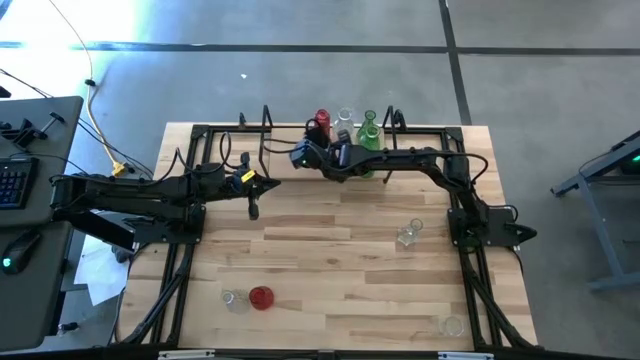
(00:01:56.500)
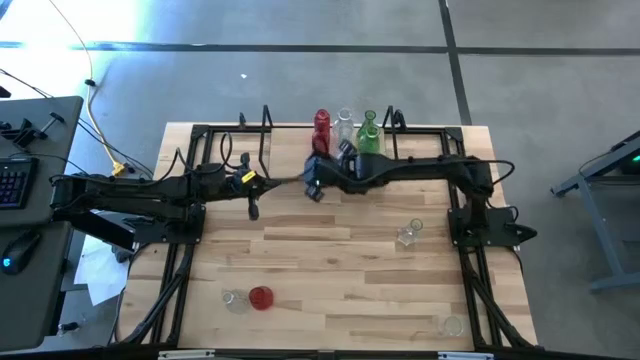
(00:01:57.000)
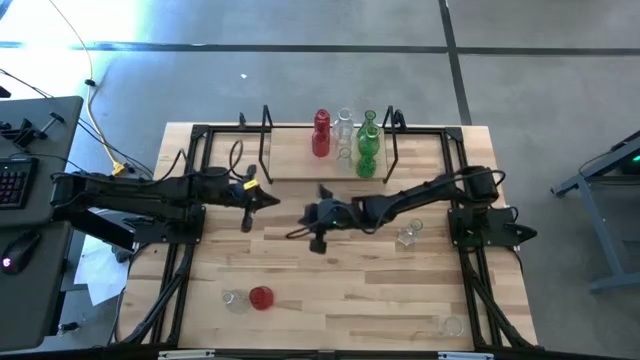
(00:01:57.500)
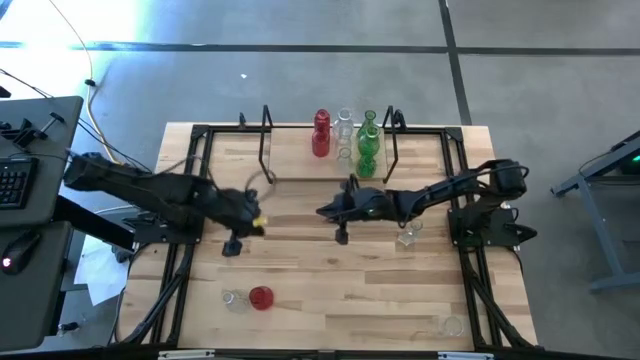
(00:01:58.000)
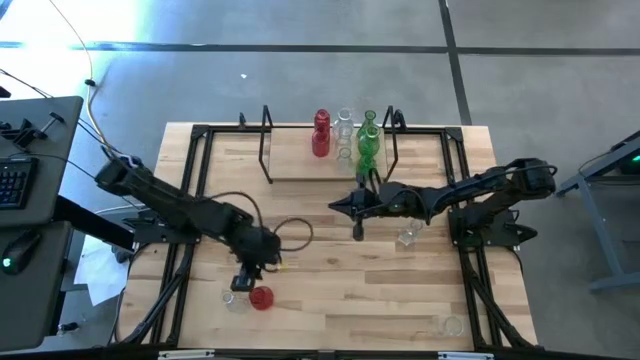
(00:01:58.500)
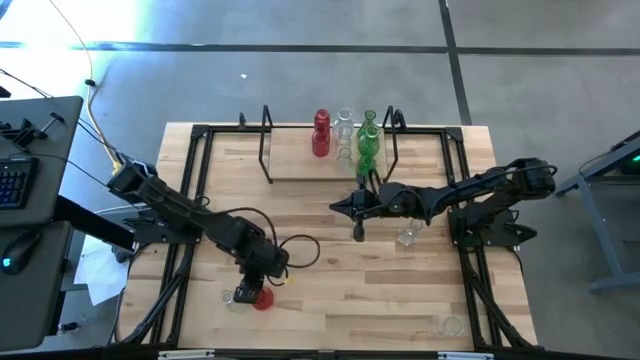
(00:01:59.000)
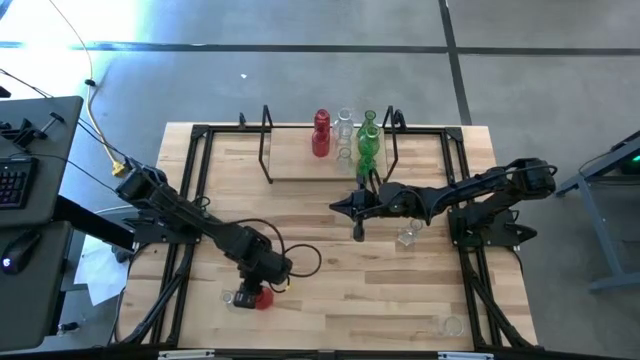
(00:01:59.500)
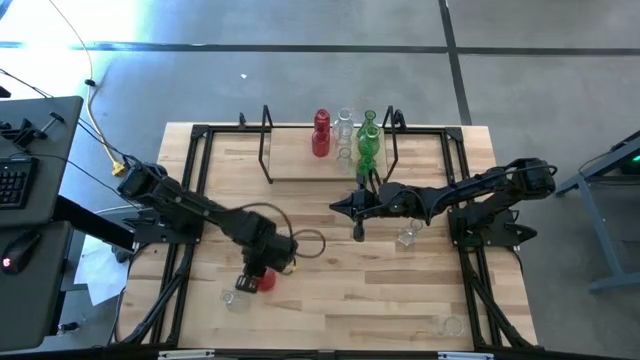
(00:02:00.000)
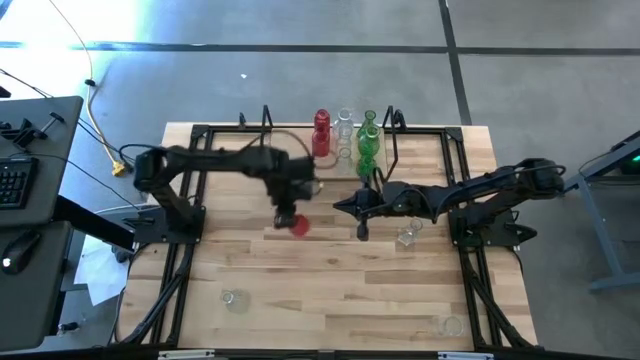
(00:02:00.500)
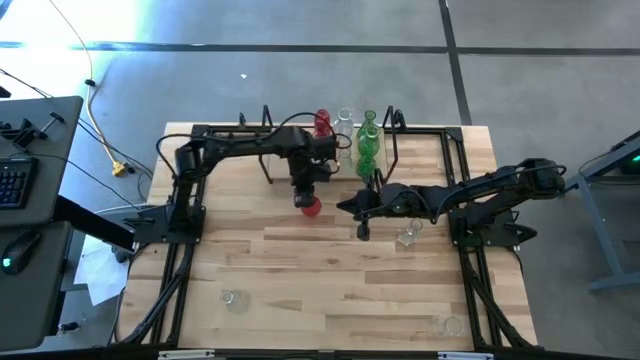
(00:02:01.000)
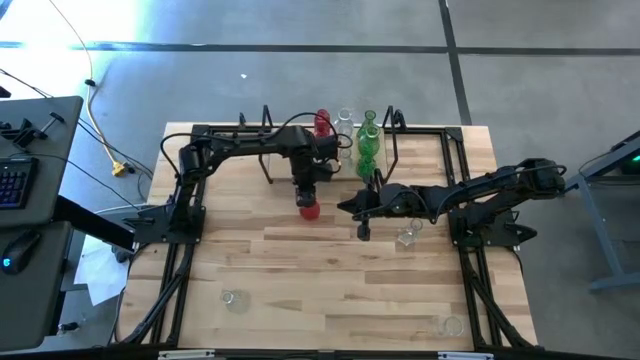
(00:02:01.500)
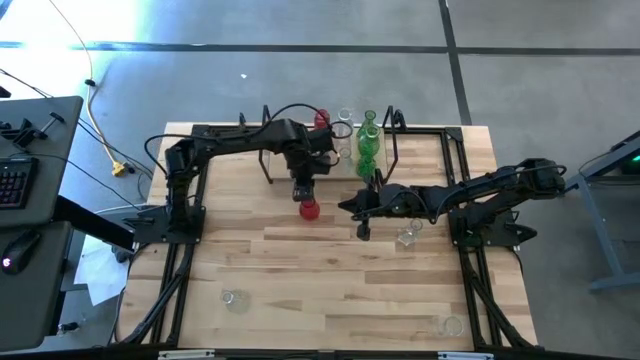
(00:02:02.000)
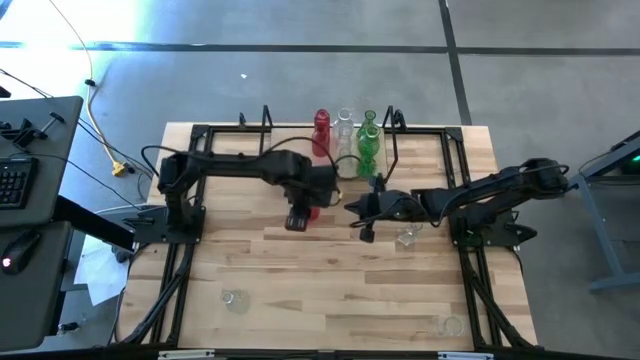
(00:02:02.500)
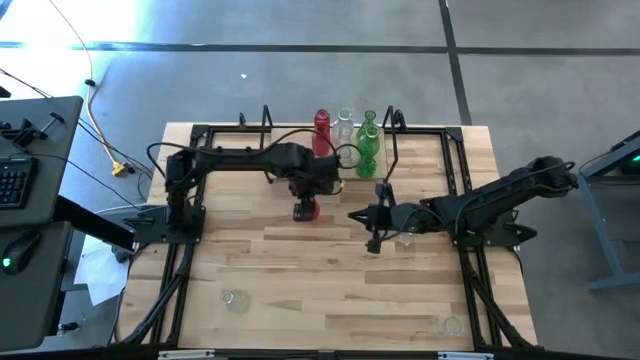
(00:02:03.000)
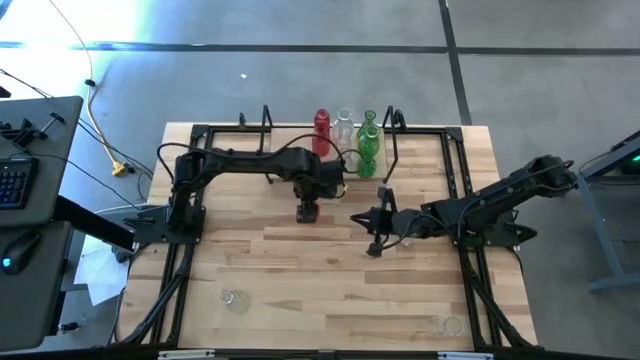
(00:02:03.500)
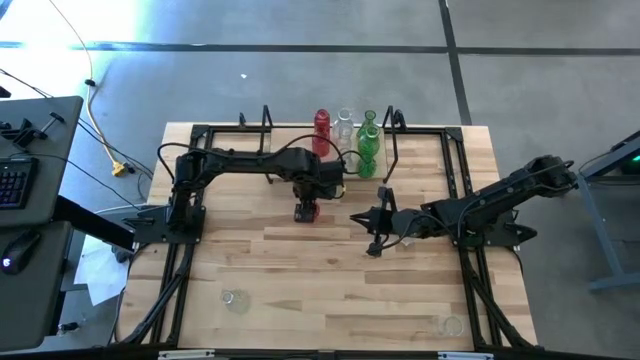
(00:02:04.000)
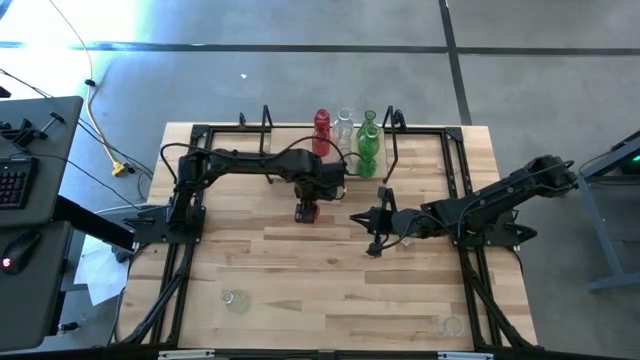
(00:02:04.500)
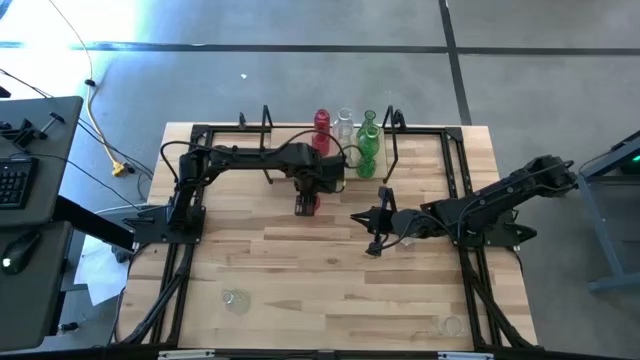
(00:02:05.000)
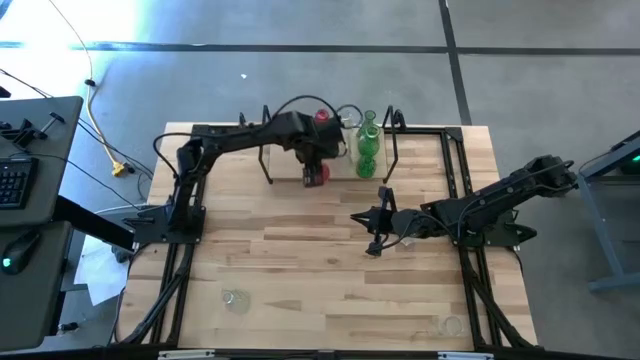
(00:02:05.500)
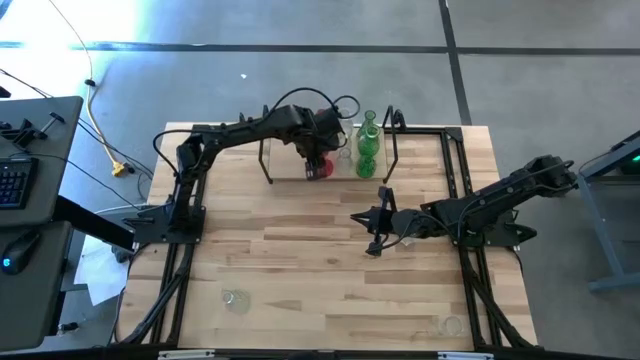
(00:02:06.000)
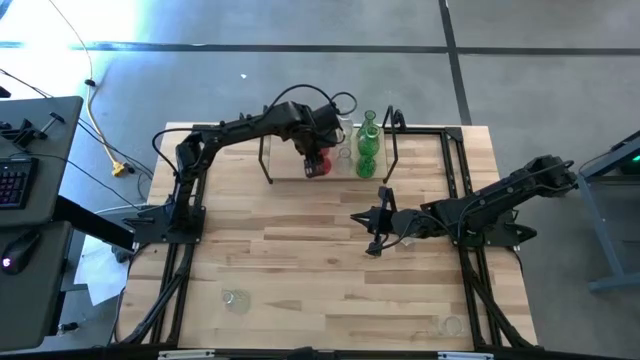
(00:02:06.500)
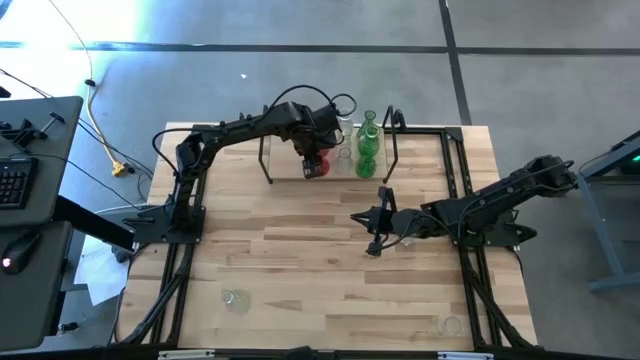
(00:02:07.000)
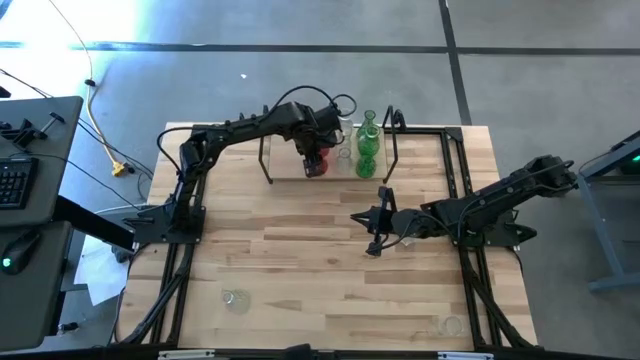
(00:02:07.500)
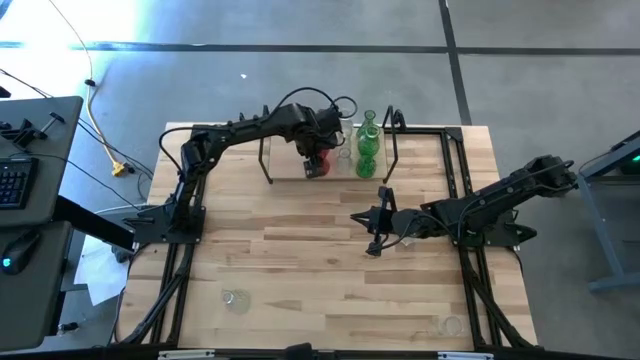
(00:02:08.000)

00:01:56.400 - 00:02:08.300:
Task: sort vases onto shelf
Put the red vase aligned with the other red vases on the shelf
